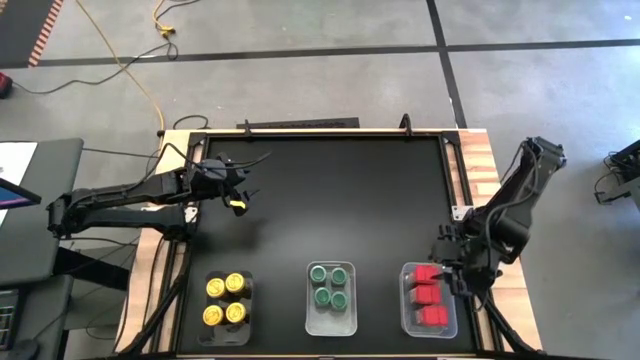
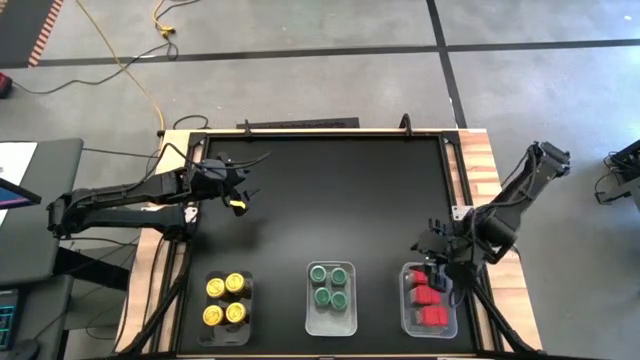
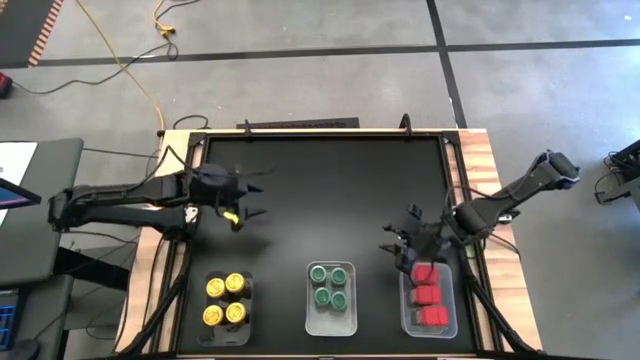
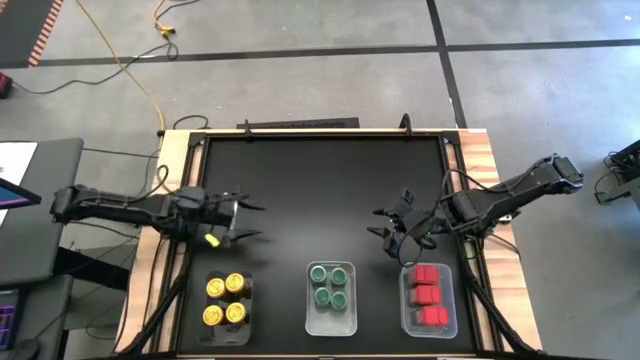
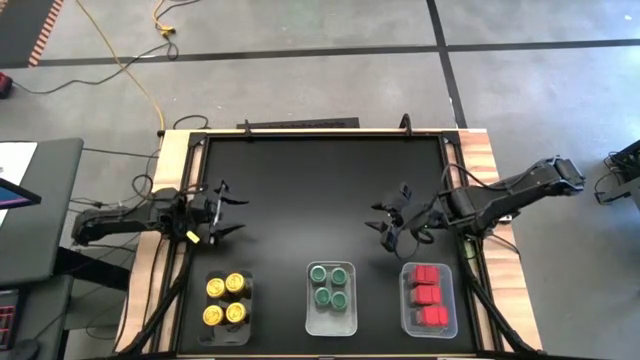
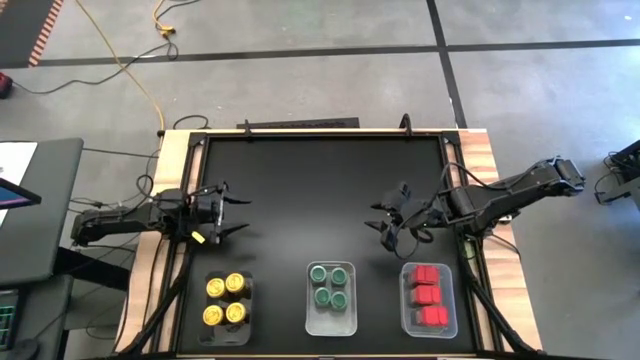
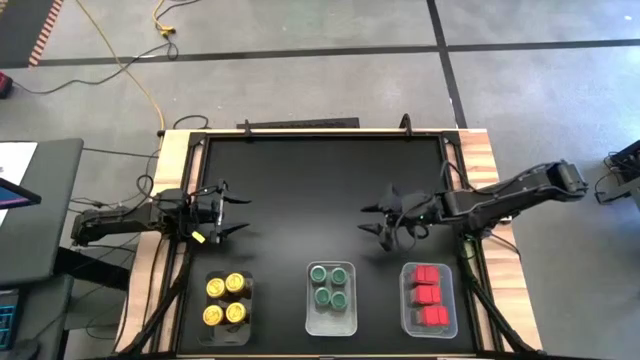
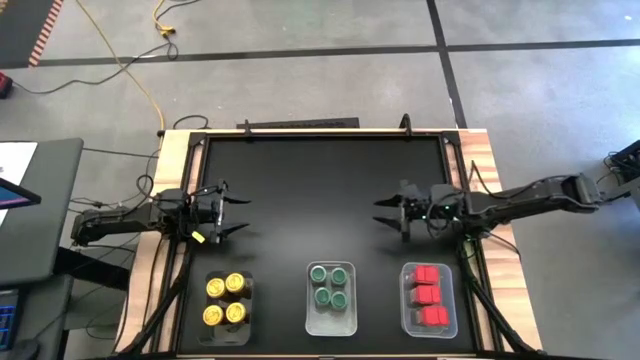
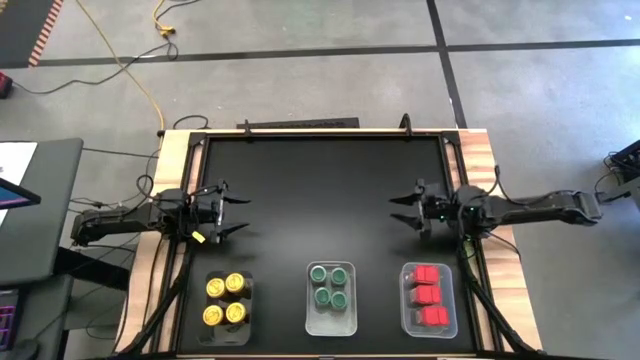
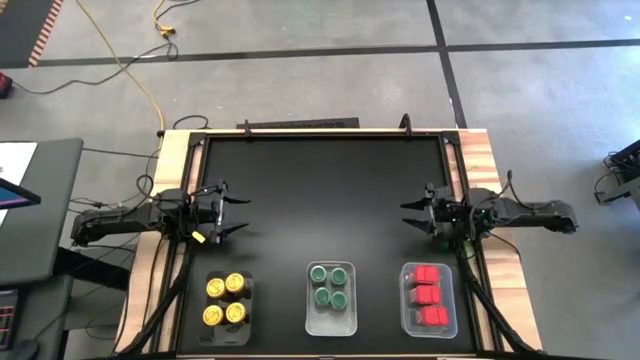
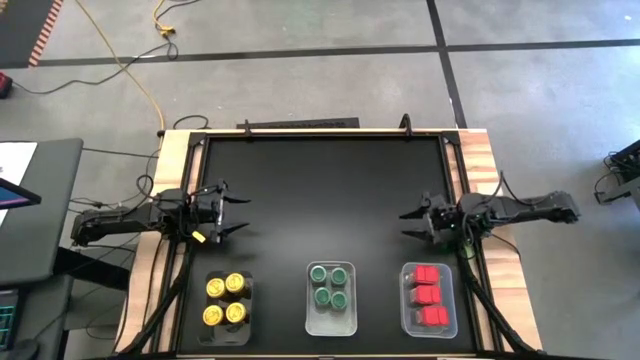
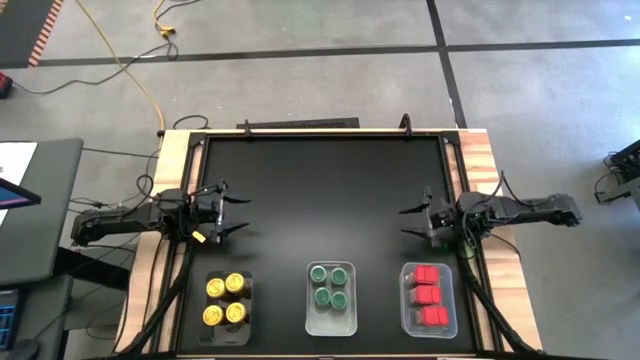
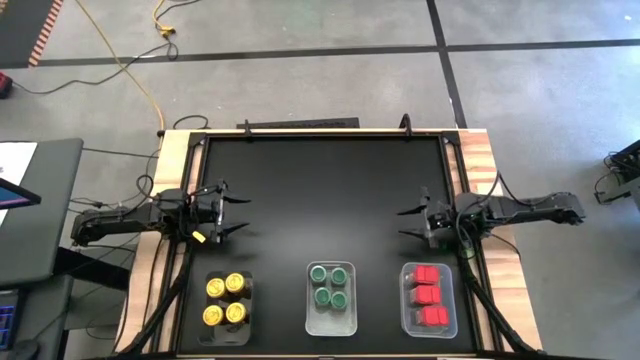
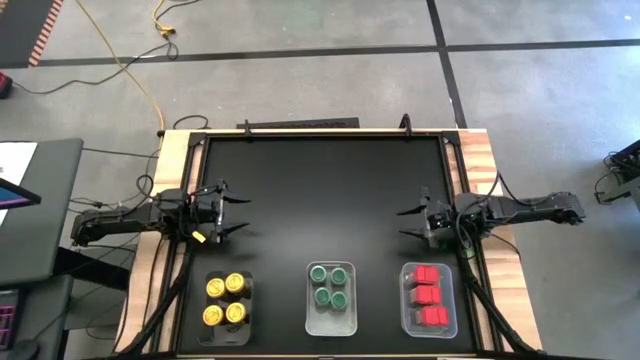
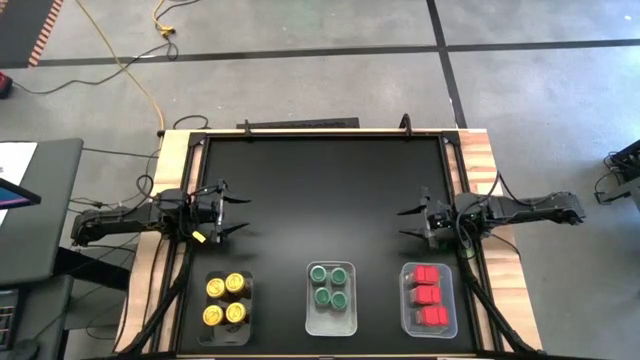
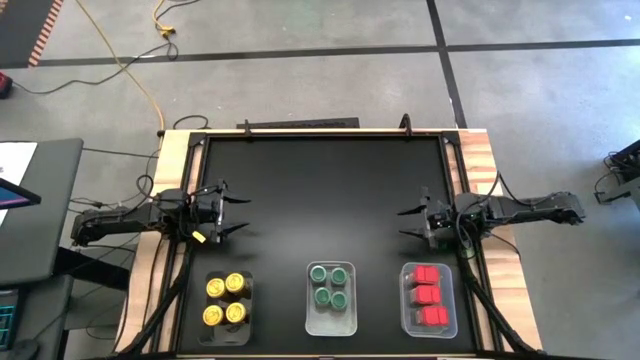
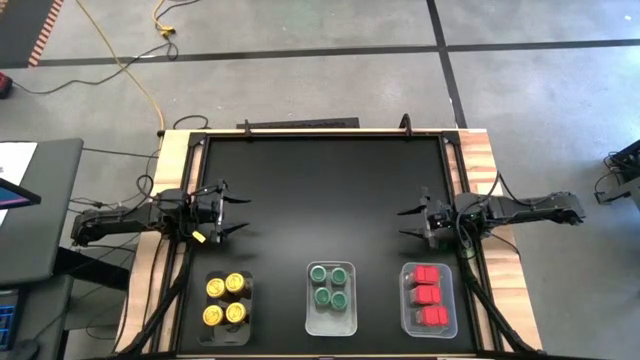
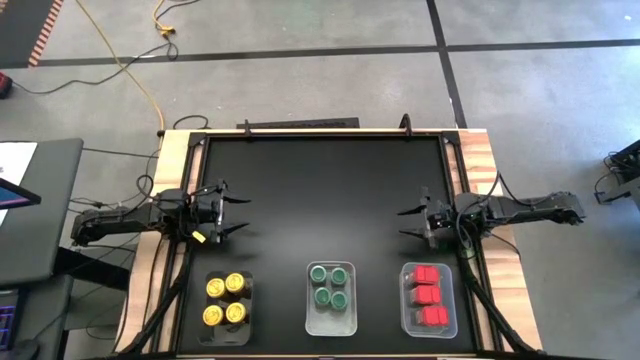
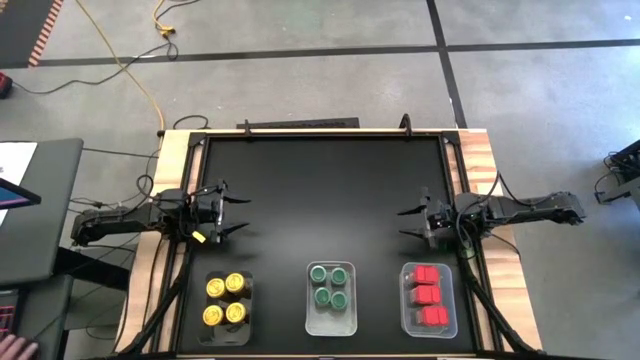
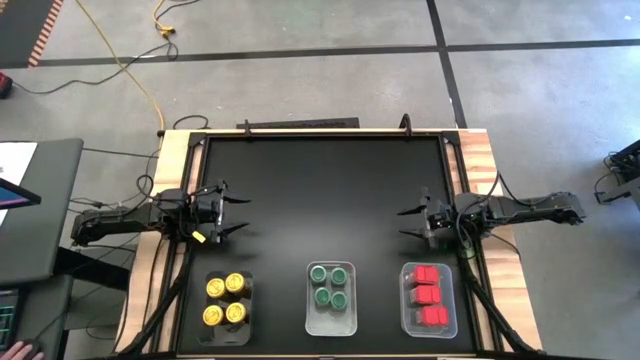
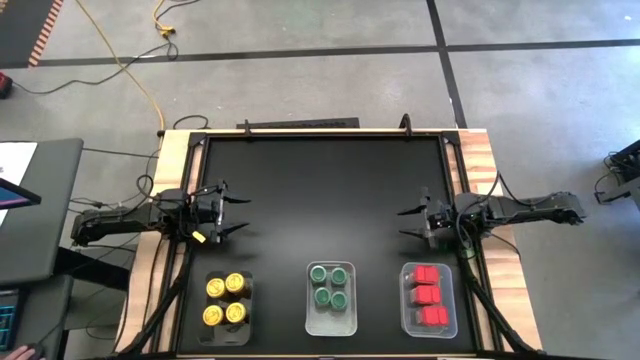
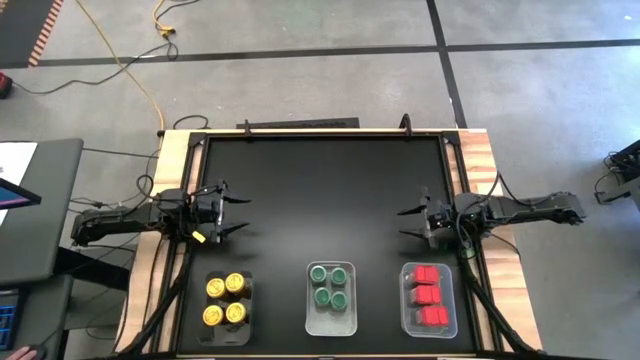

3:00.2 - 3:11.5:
Task: Sort spices by type
Return to Home Position

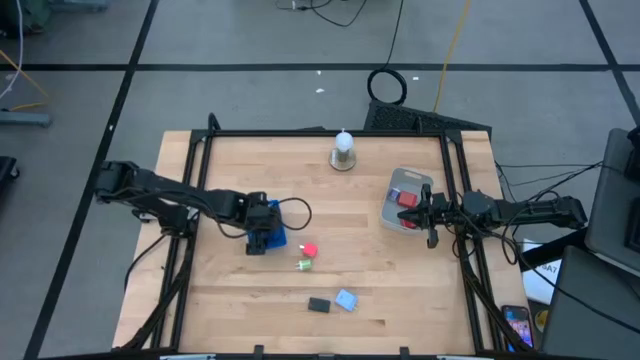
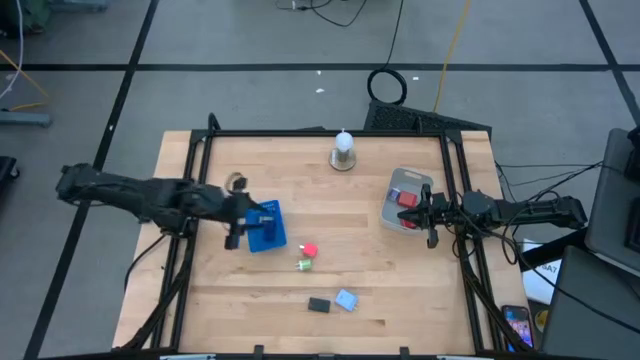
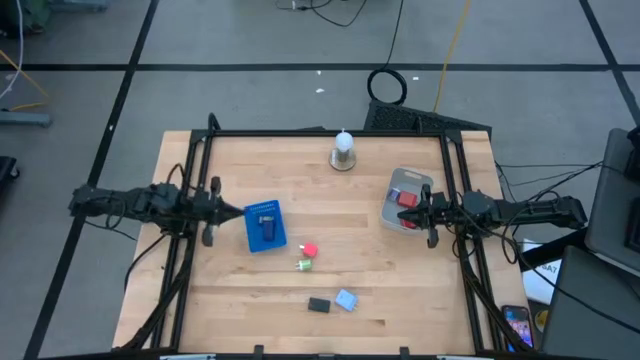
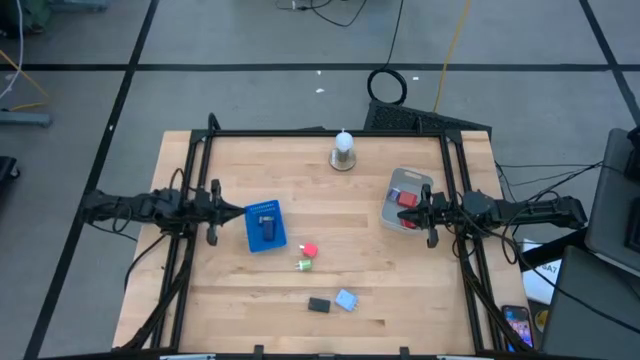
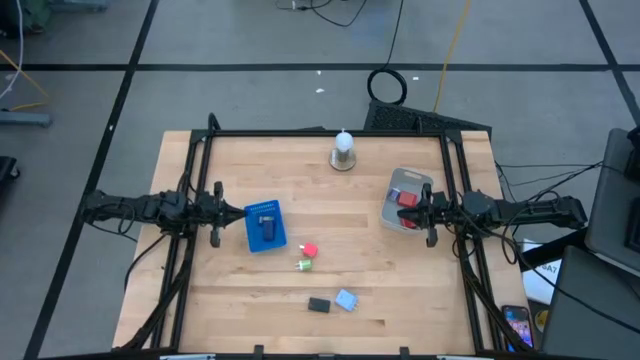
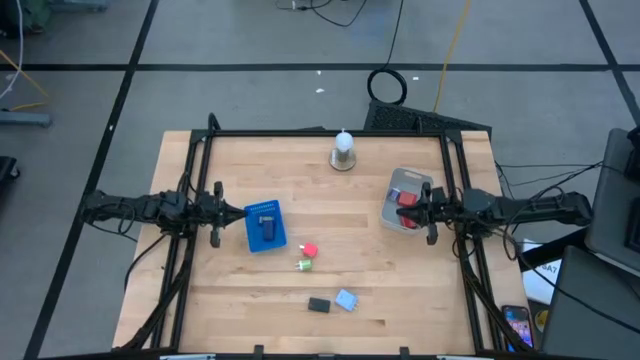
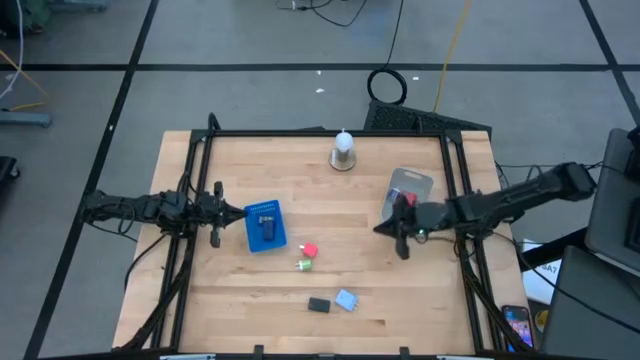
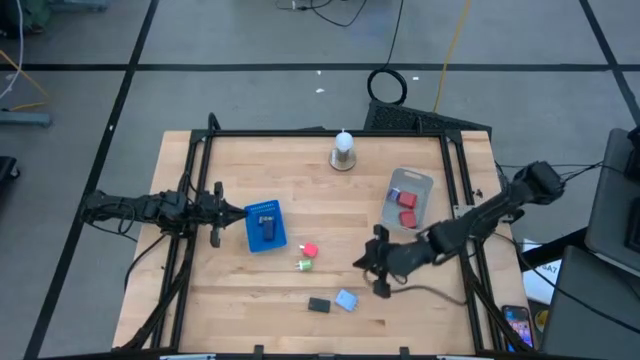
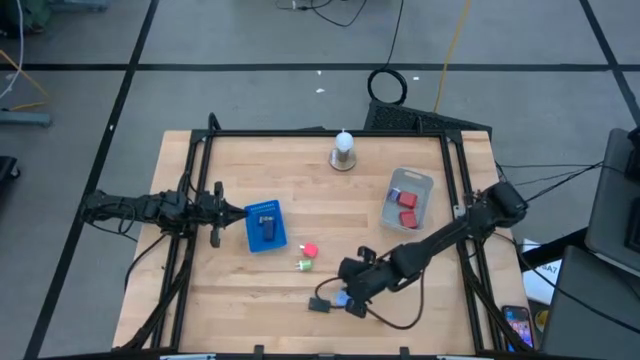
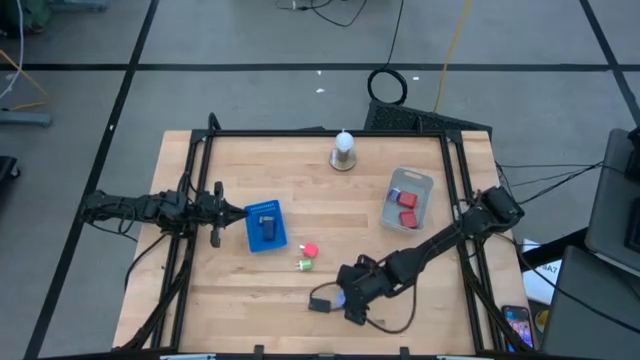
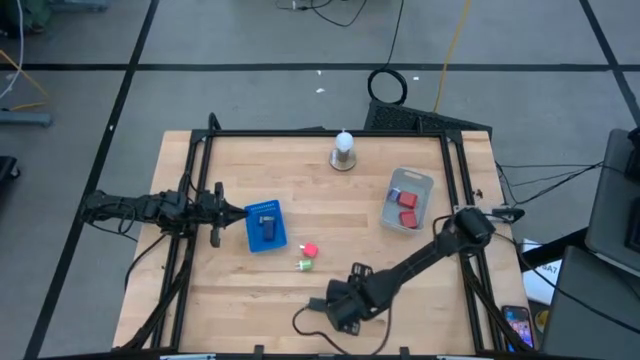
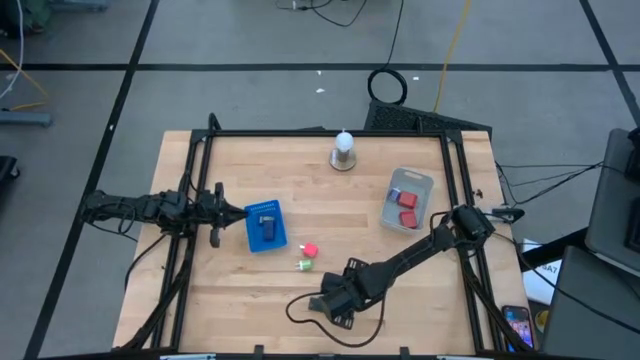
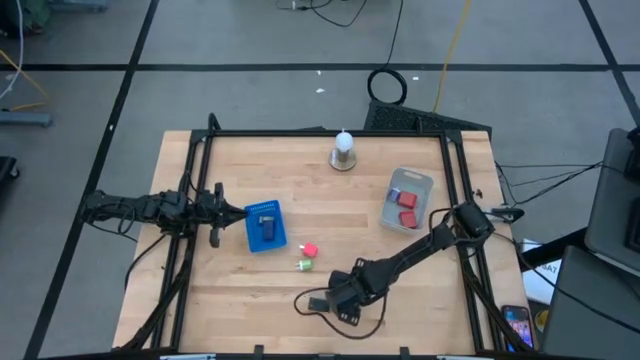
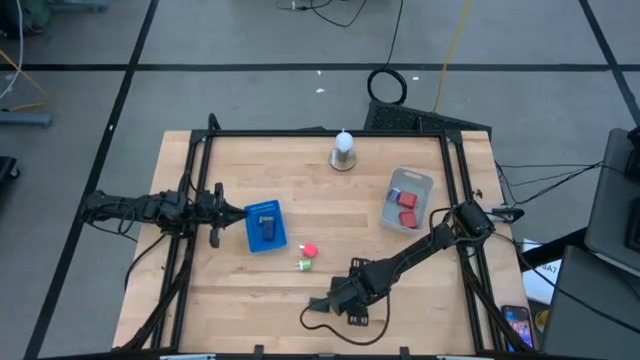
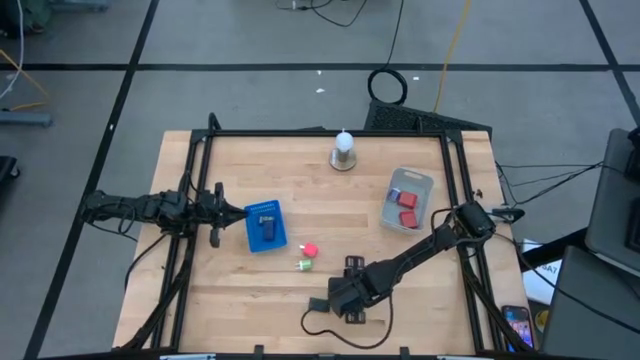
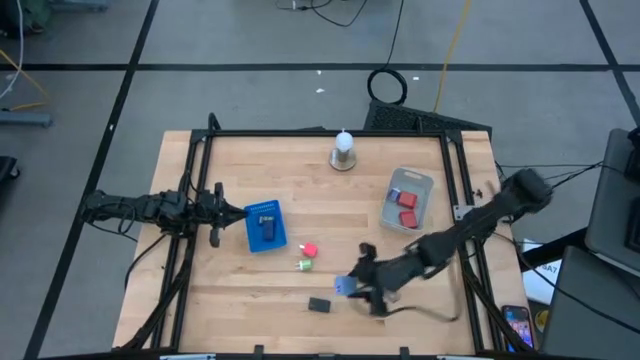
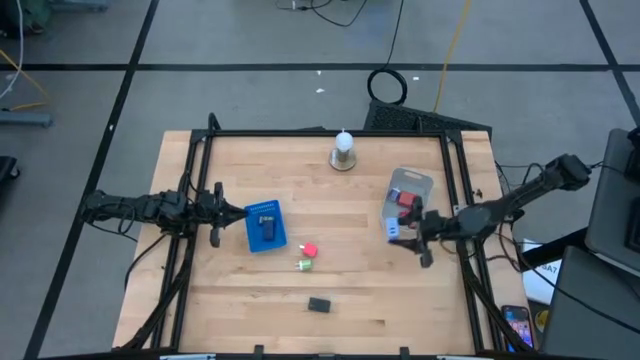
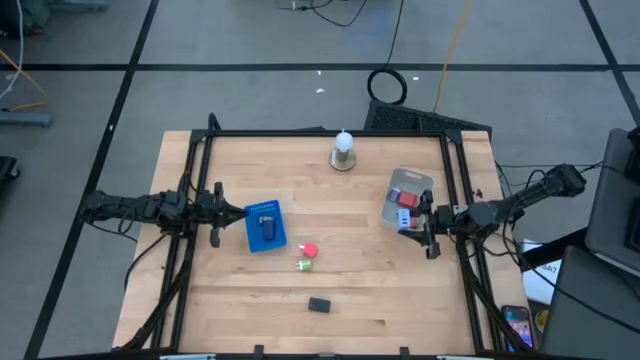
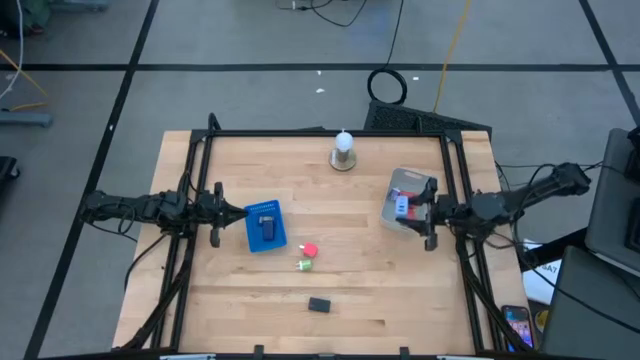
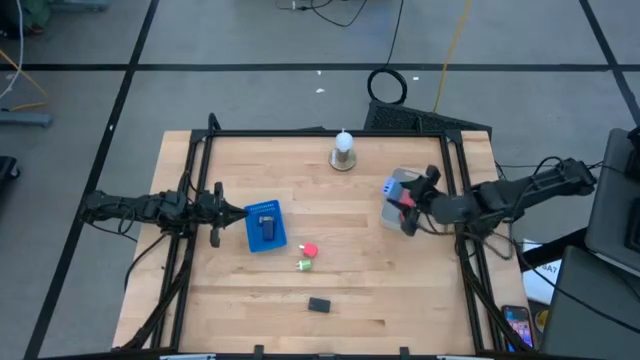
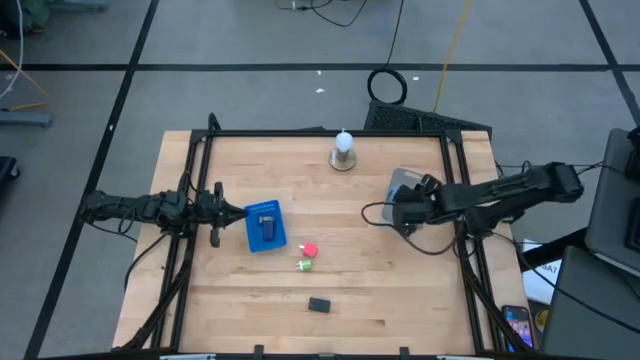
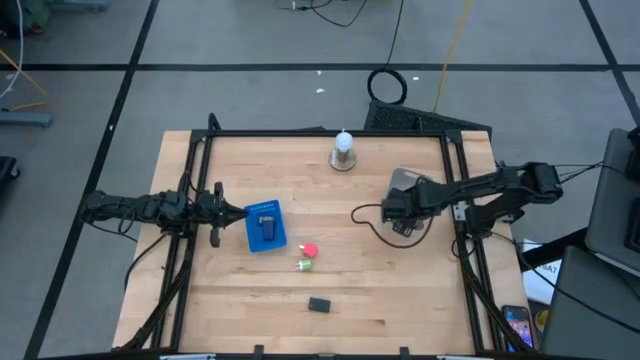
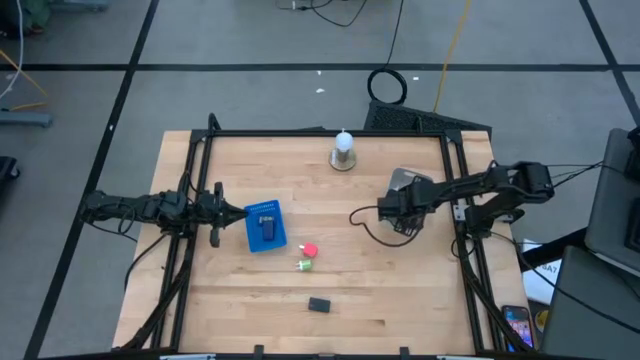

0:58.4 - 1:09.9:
Task: Pick & Place Office items
Put the light blue charger adapter into the gray bin
